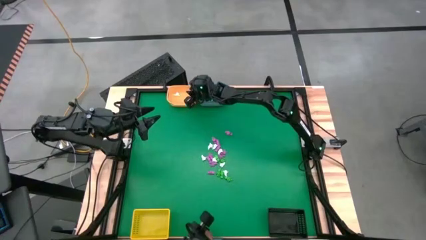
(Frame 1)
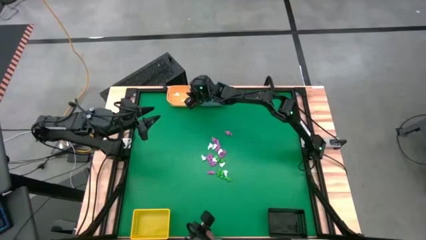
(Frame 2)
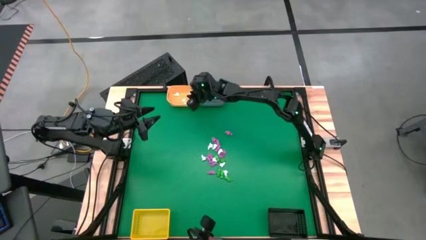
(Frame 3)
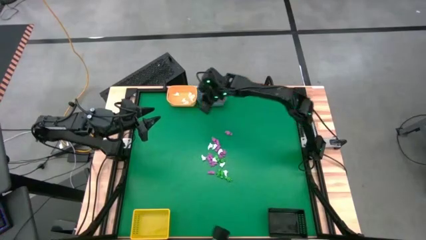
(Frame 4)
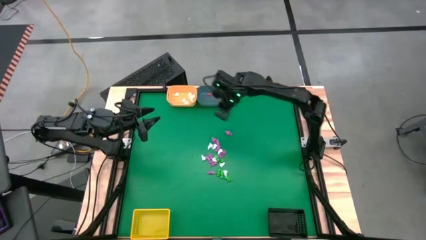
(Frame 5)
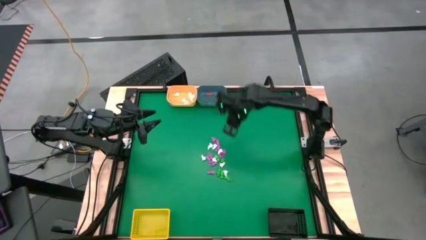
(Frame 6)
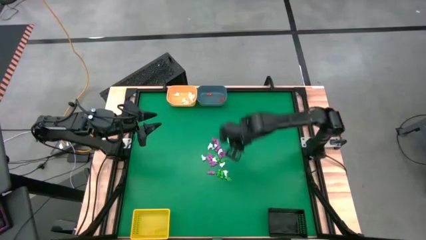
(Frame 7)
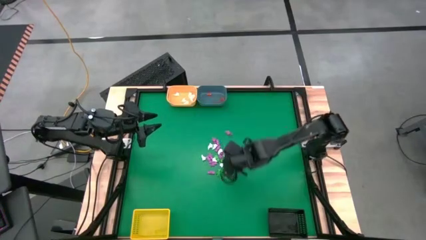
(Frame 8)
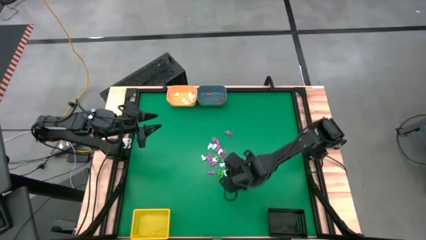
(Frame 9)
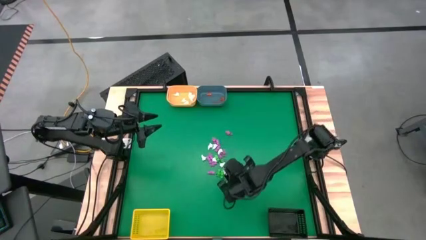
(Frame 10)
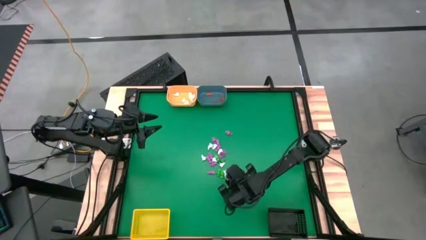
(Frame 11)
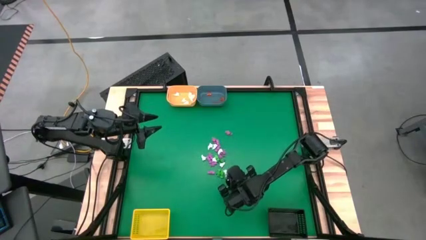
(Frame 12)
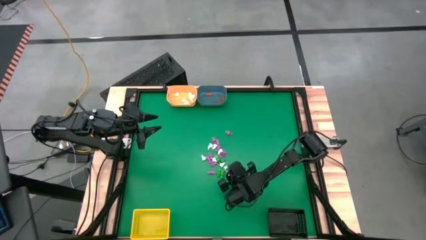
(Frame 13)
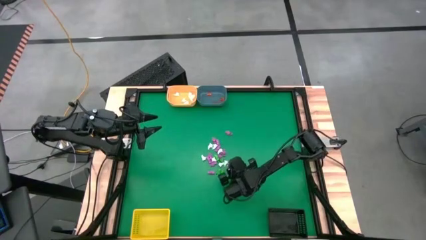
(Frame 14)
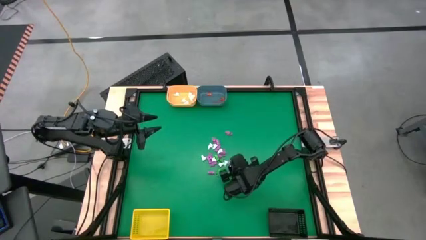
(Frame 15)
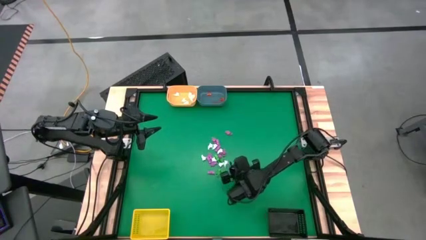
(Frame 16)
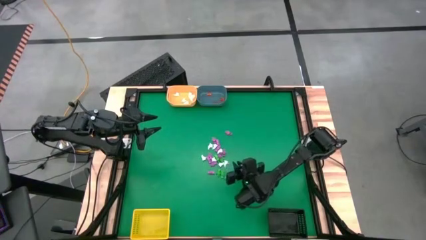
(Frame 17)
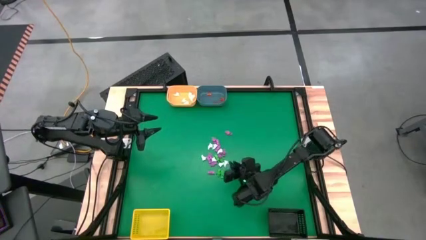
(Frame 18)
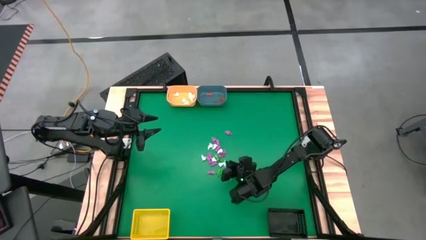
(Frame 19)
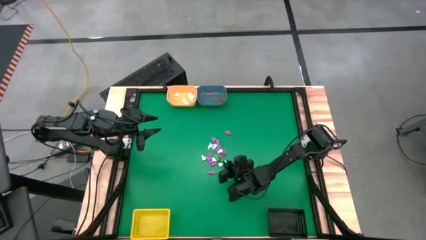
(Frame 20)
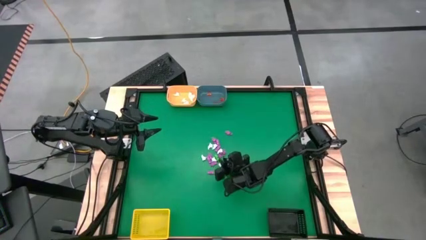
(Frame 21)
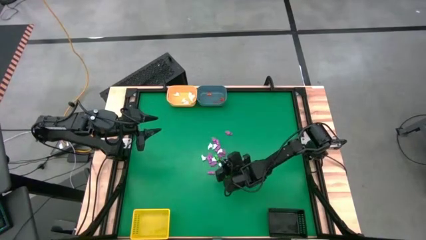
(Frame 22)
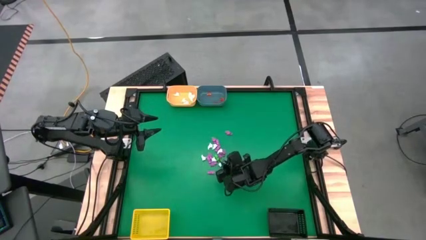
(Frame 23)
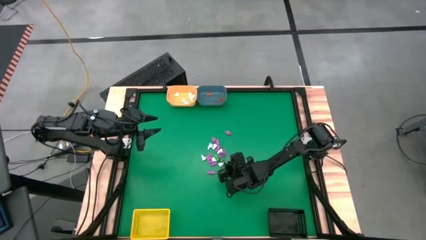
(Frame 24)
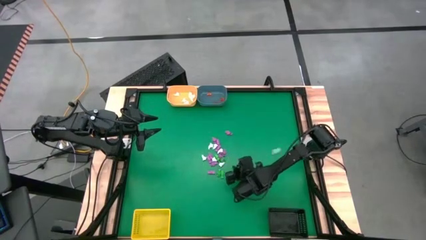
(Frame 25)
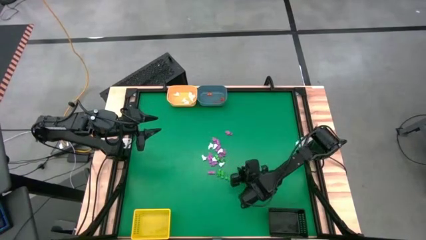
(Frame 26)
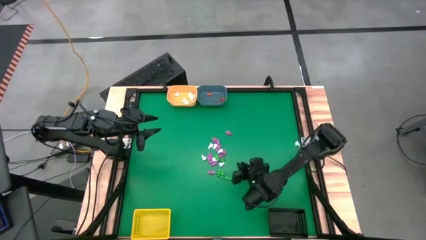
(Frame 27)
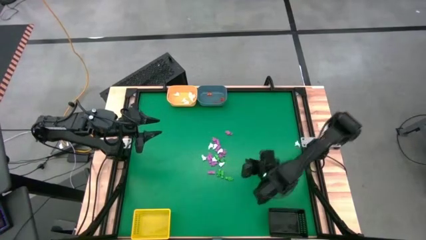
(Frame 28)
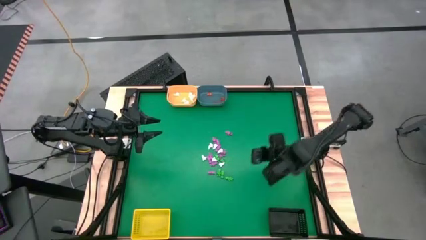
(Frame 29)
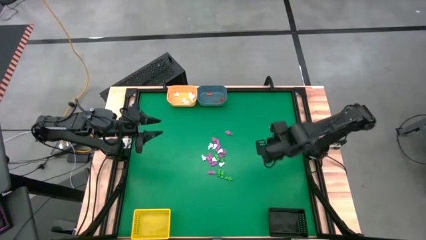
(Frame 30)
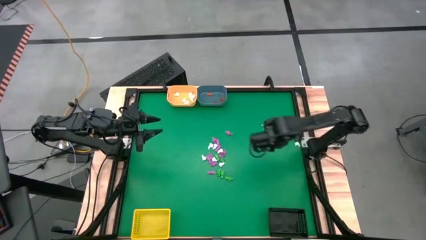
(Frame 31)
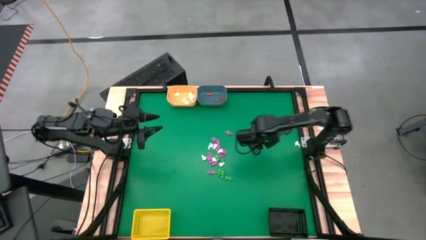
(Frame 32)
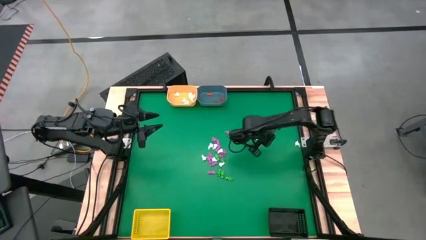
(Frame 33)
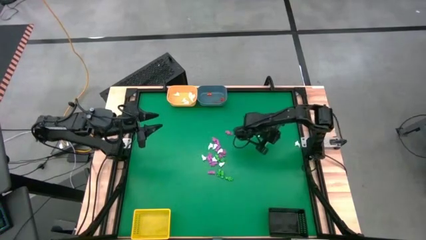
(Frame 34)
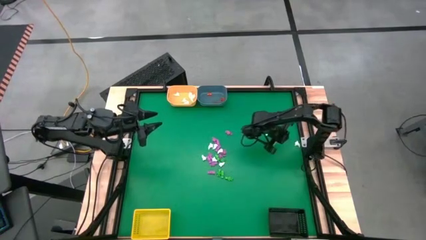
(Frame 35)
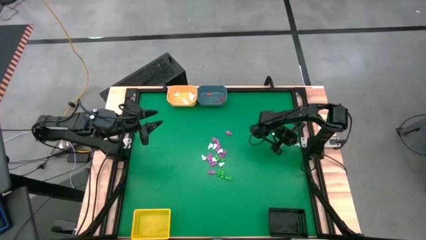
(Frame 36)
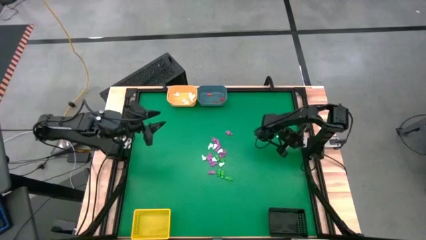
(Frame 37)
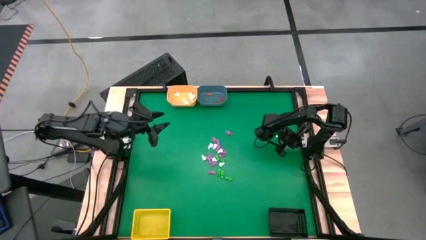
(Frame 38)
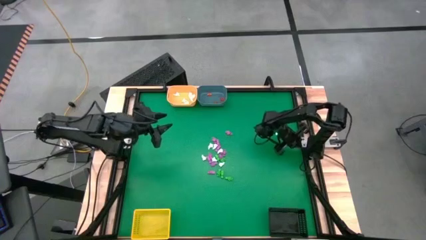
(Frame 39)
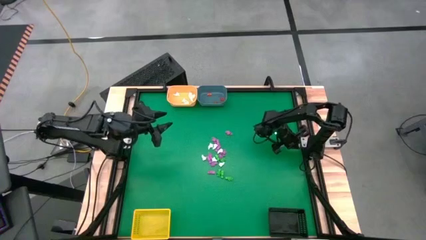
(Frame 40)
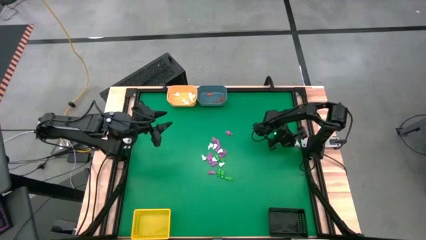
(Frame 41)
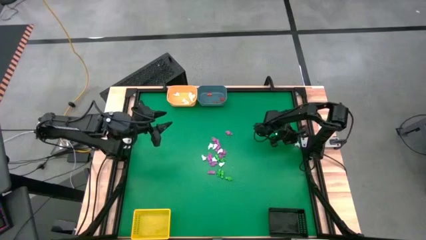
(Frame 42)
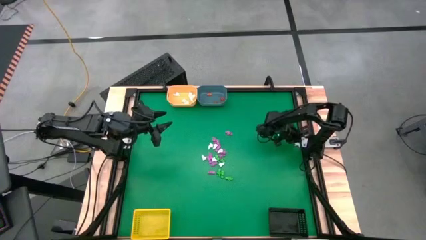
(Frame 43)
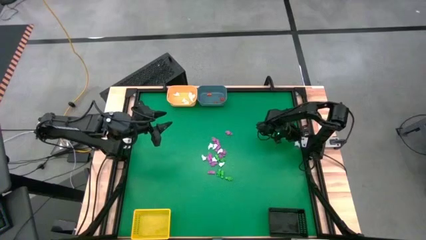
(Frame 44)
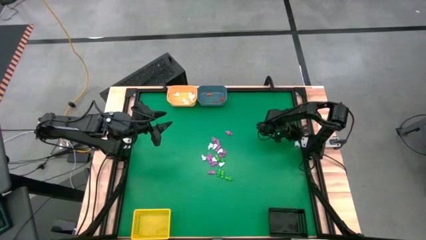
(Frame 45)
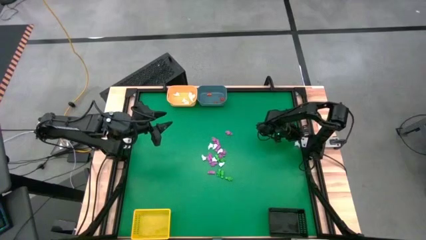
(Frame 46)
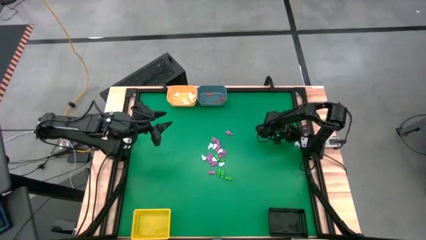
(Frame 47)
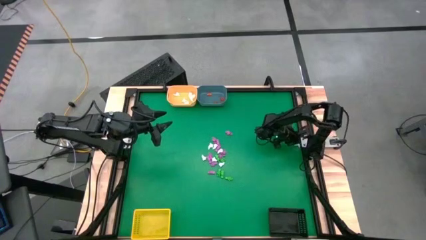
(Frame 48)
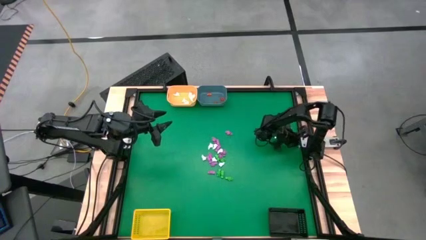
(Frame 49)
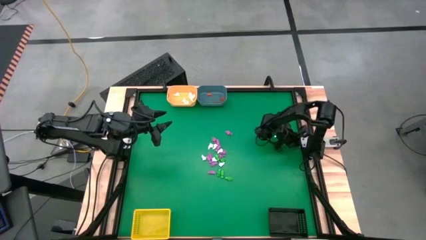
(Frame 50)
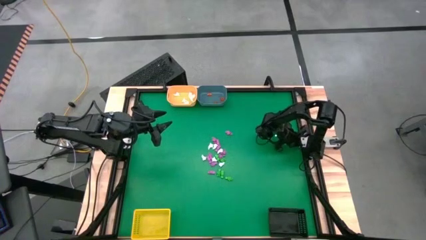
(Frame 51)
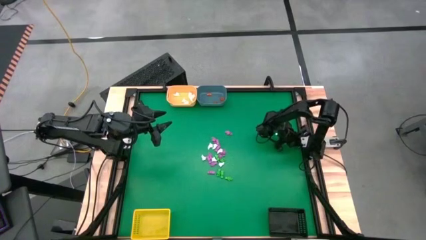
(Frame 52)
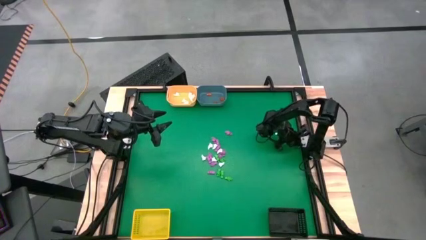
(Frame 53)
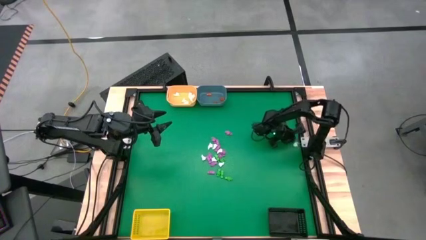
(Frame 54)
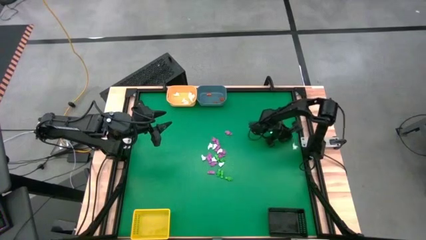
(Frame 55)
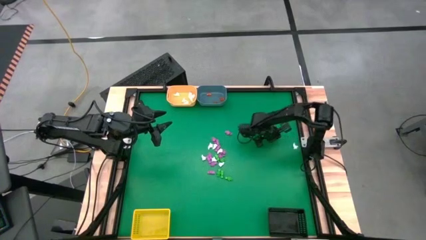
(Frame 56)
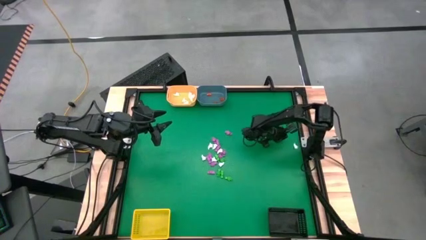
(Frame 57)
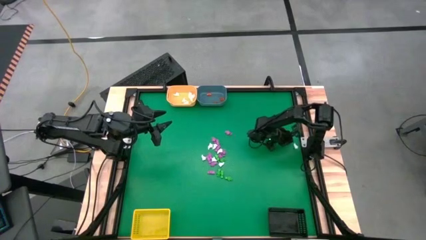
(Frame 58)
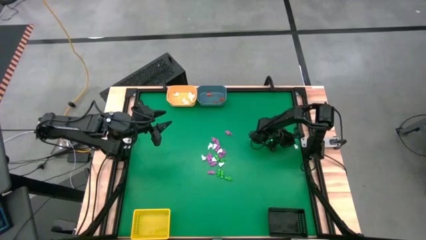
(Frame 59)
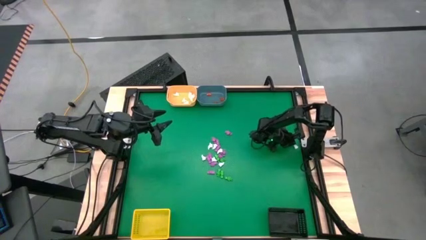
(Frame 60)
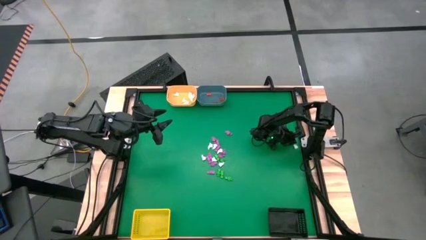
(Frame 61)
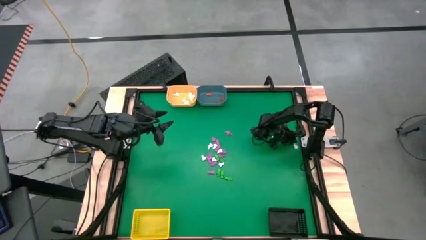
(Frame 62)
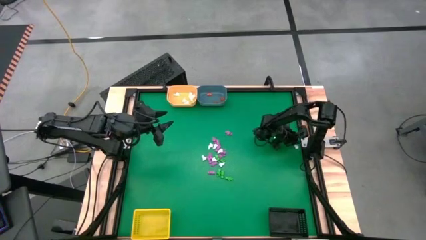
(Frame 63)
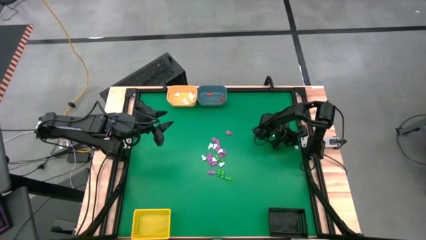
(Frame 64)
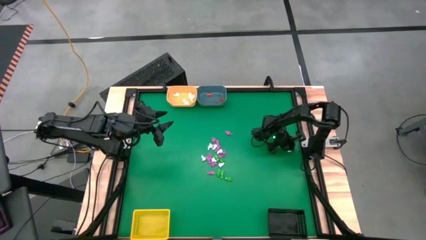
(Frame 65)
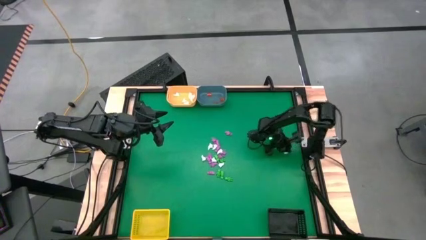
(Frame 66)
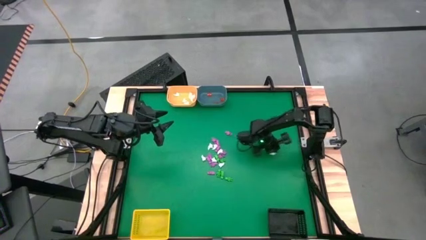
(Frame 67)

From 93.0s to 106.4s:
Task: Sort Halloween decoration
Put the white ghost into the orange bin

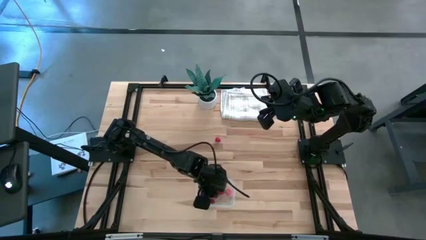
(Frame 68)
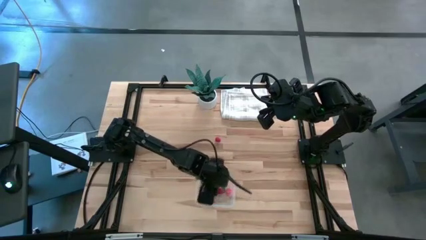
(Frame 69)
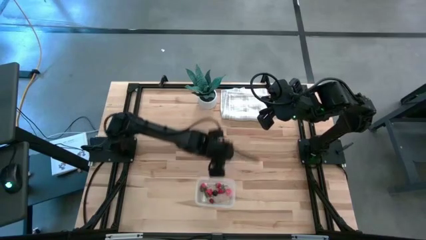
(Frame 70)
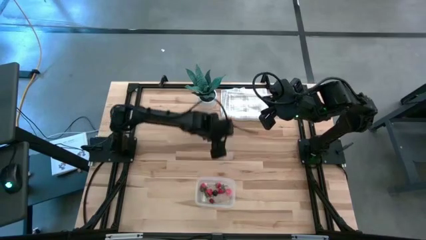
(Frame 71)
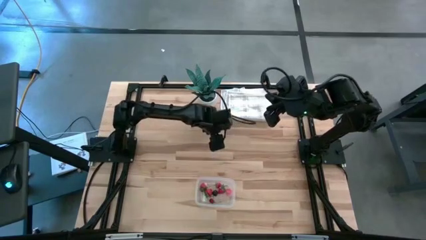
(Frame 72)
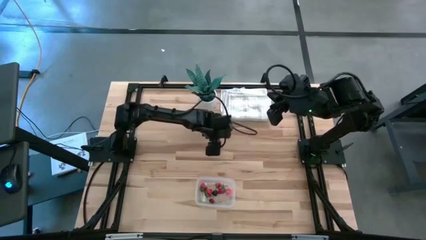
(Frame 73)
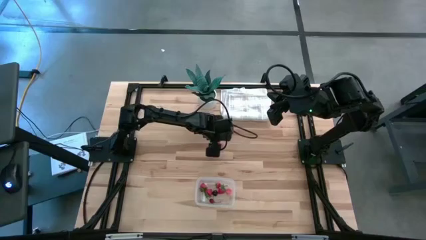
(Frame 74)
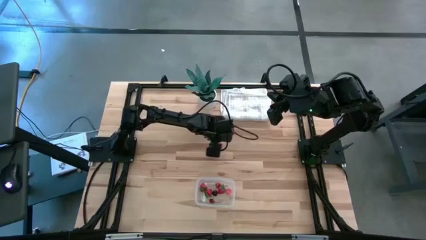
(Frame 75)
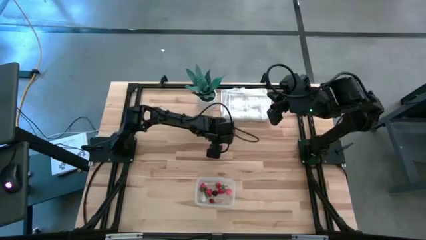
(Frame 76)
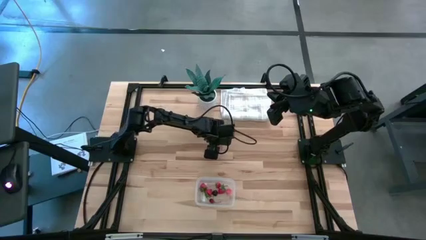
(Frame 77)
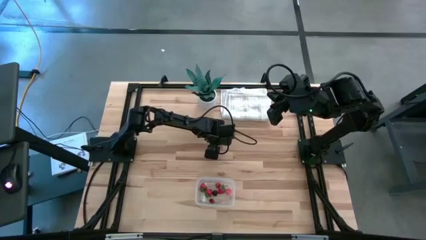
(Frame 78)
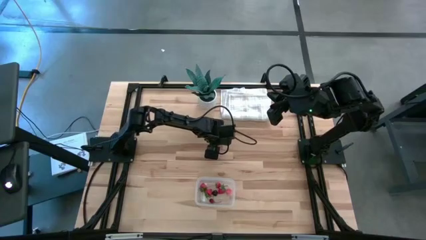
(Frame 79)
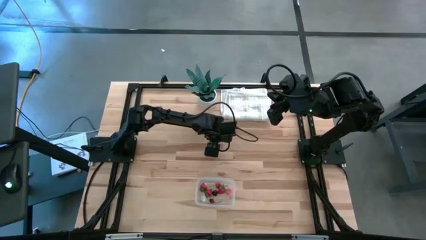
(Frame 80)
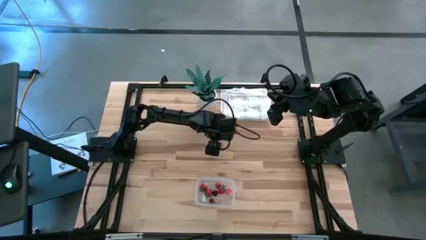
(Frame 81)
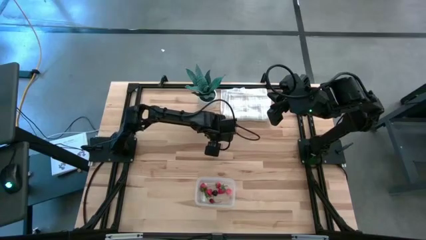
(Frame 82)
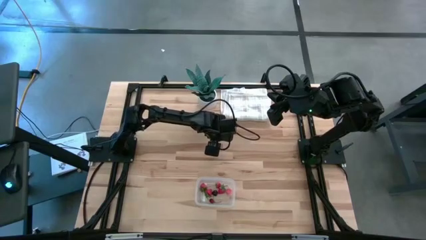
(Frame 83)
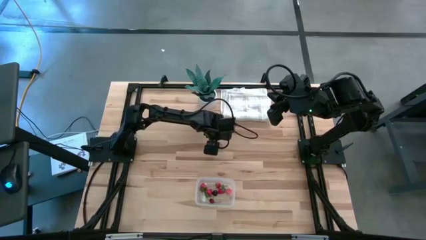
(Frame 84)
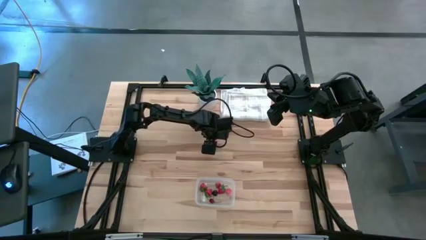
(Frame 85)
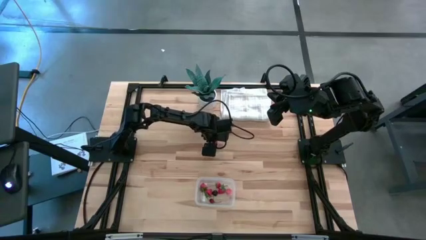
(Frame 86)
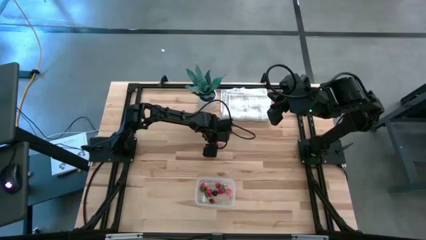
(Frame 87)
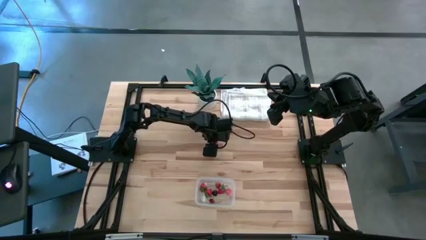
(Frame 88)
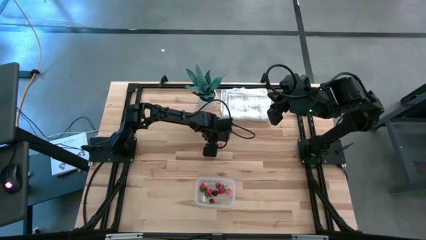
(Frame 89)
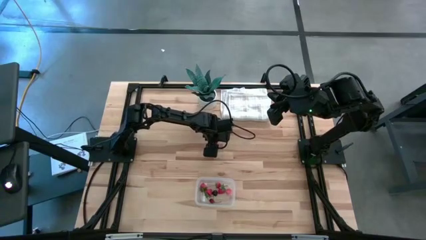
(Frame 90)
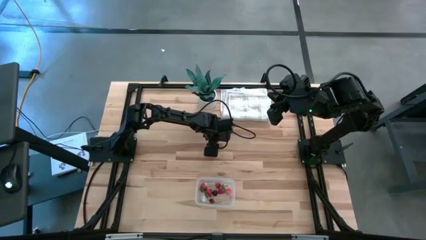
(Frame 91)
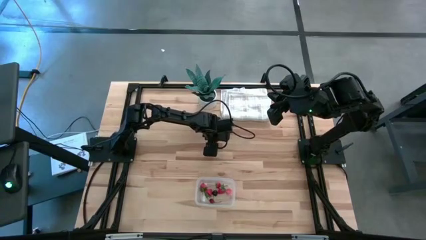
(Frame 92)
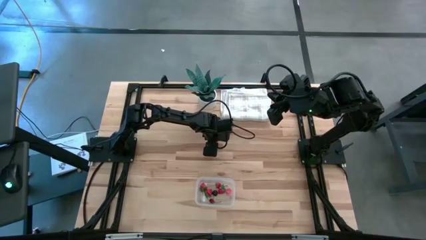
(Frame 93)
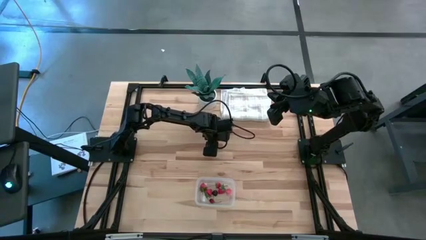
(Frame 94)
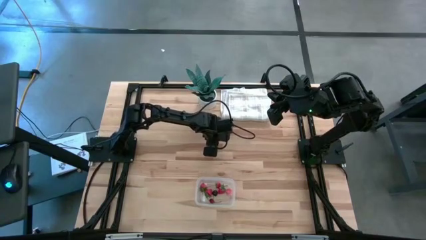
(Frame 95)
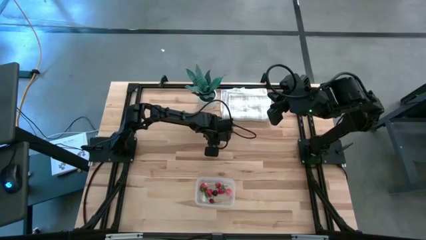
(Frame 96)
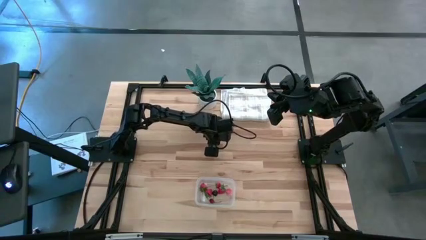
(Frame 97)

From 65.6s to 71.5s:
Task: Pick and placing Produce into tupperware
Put the raspberry into the transparent bin
